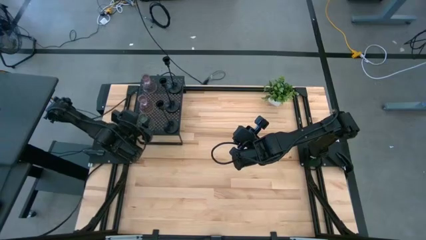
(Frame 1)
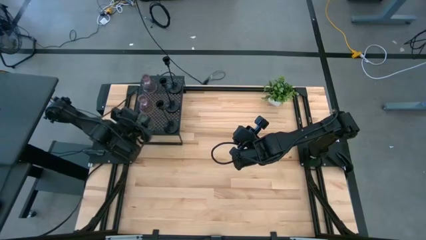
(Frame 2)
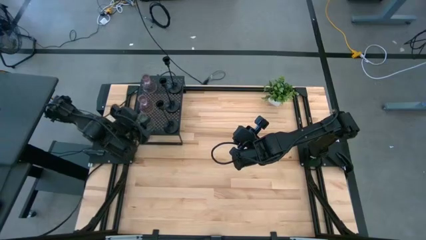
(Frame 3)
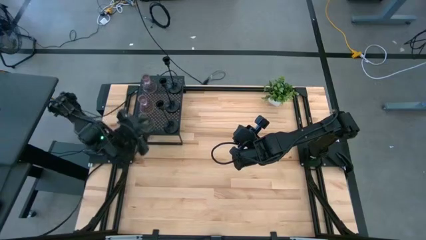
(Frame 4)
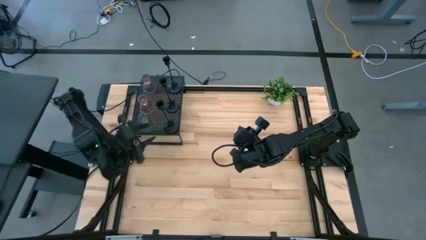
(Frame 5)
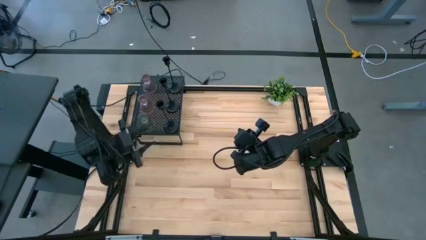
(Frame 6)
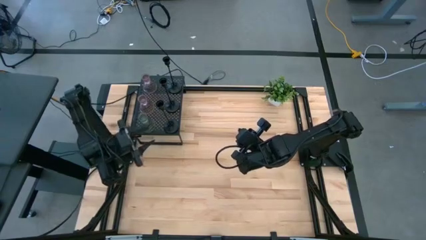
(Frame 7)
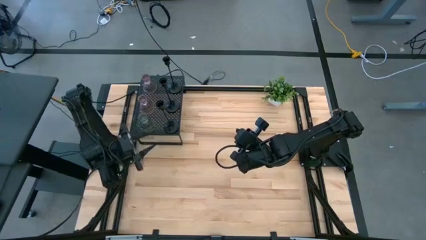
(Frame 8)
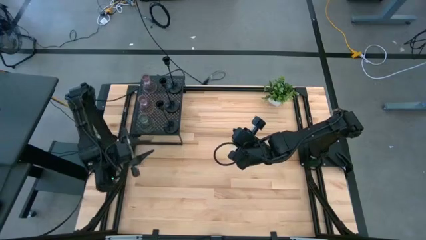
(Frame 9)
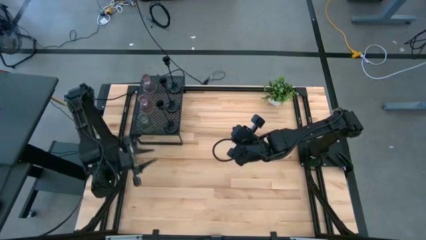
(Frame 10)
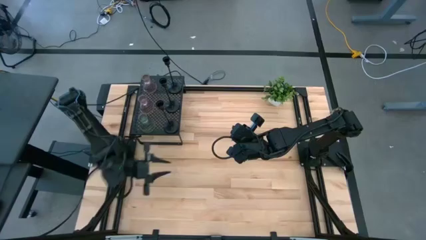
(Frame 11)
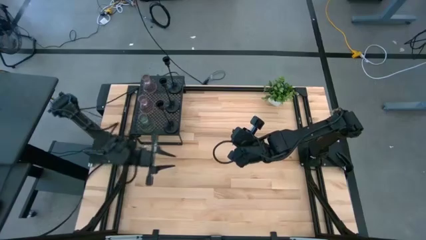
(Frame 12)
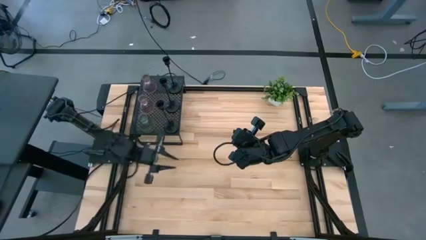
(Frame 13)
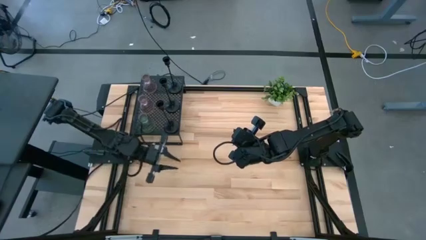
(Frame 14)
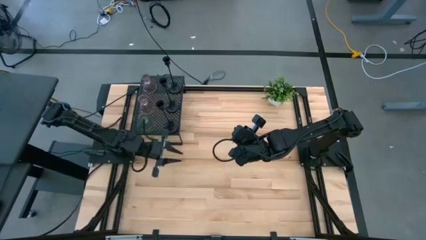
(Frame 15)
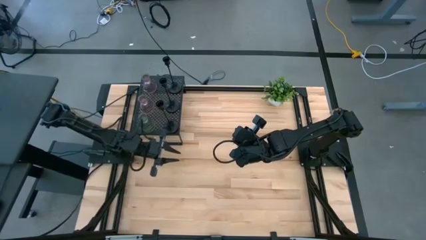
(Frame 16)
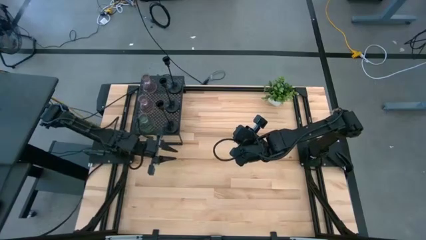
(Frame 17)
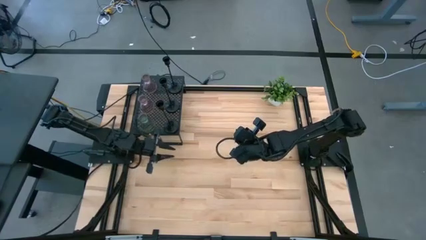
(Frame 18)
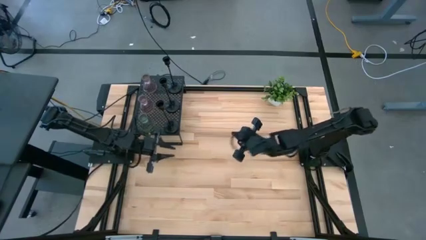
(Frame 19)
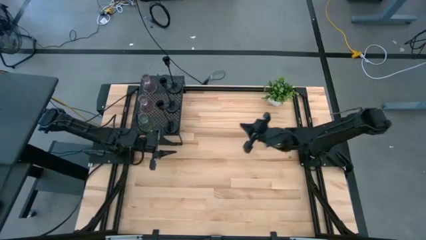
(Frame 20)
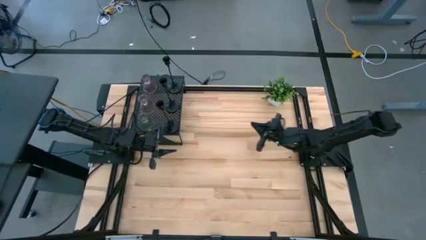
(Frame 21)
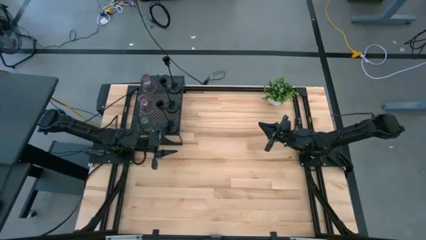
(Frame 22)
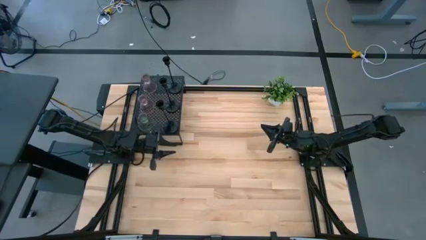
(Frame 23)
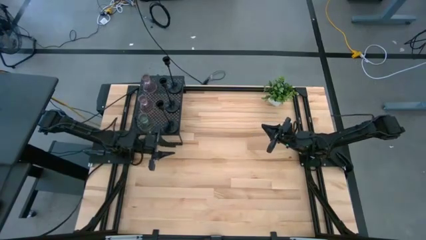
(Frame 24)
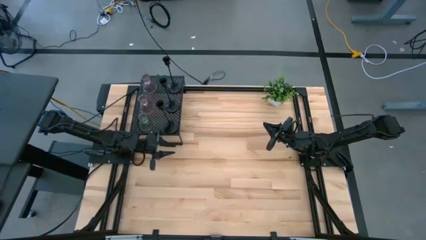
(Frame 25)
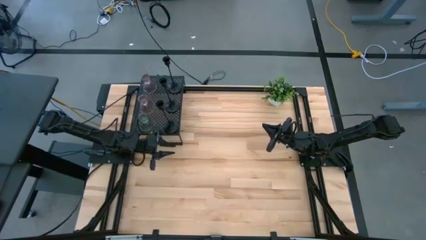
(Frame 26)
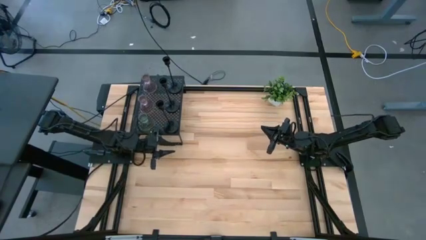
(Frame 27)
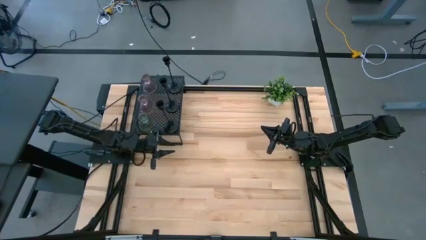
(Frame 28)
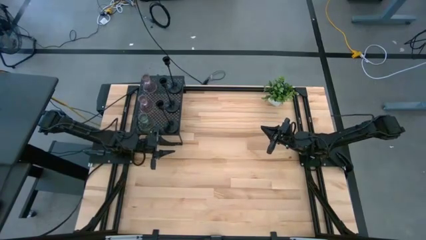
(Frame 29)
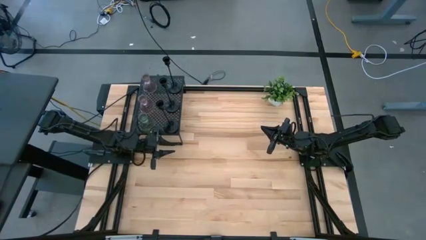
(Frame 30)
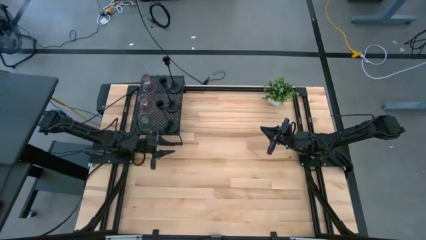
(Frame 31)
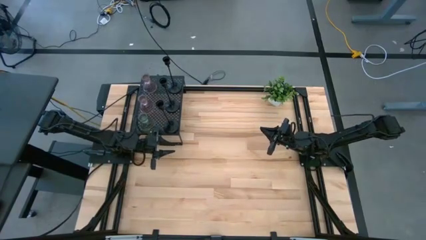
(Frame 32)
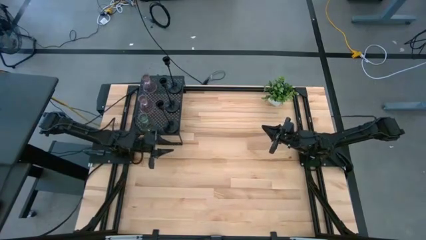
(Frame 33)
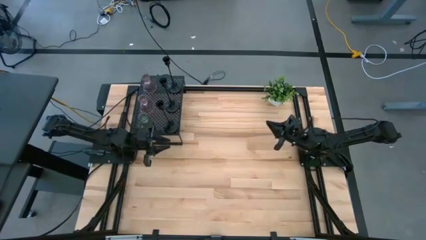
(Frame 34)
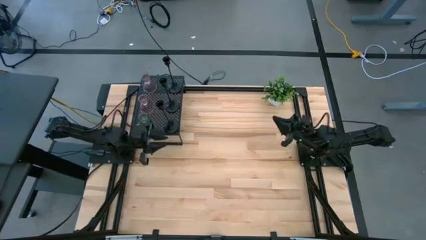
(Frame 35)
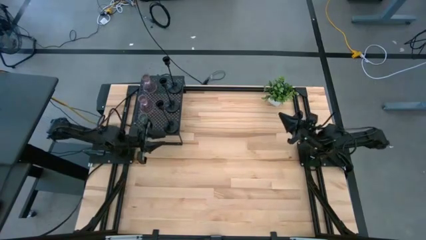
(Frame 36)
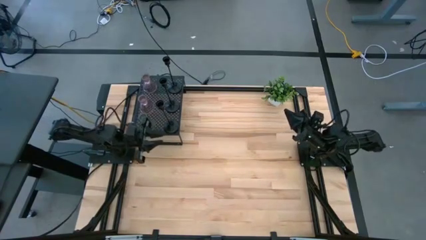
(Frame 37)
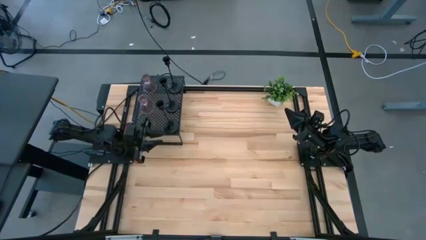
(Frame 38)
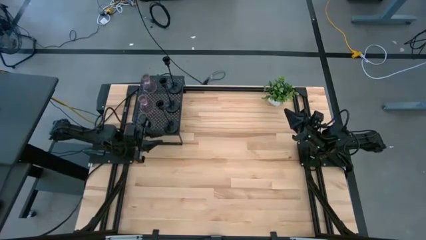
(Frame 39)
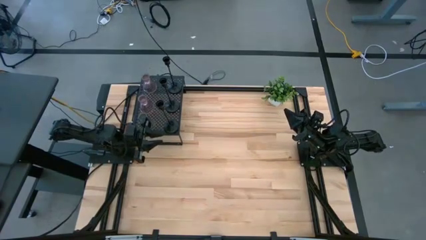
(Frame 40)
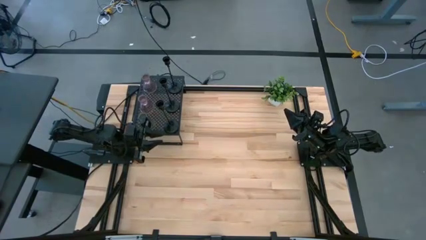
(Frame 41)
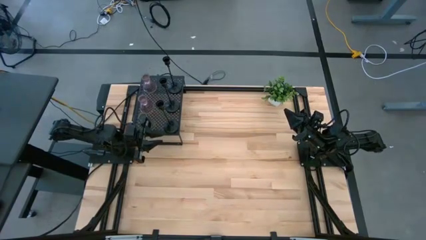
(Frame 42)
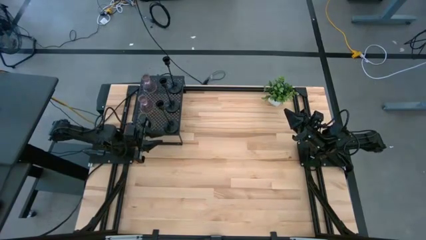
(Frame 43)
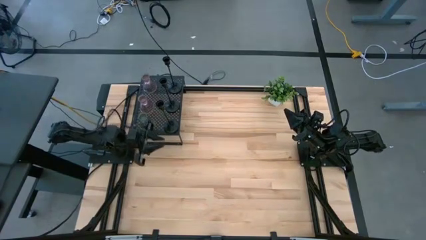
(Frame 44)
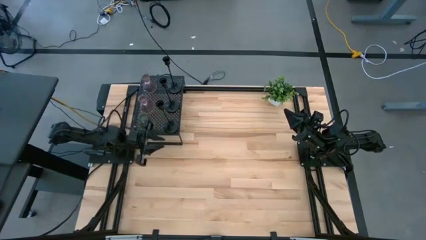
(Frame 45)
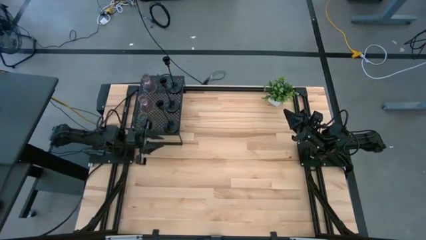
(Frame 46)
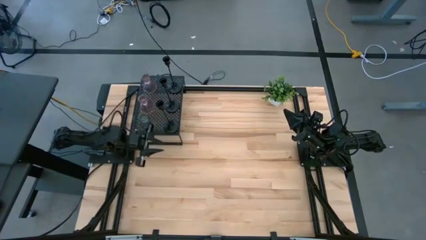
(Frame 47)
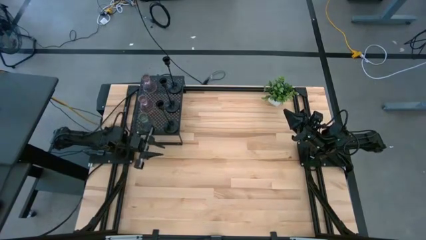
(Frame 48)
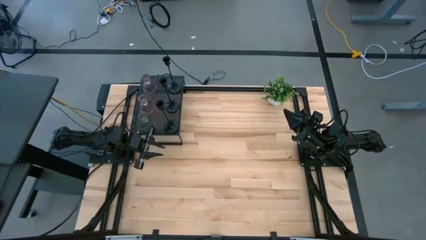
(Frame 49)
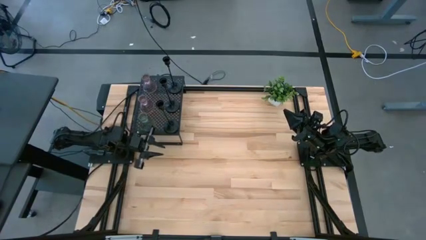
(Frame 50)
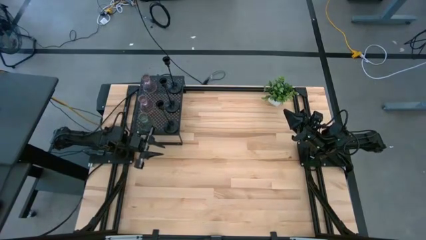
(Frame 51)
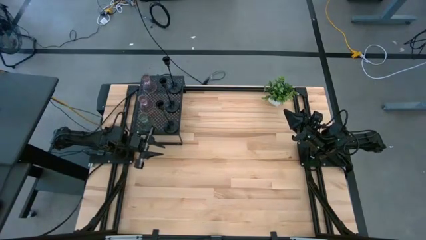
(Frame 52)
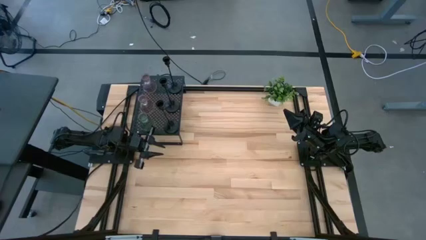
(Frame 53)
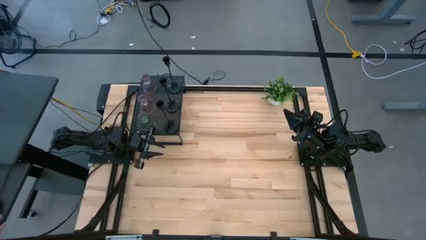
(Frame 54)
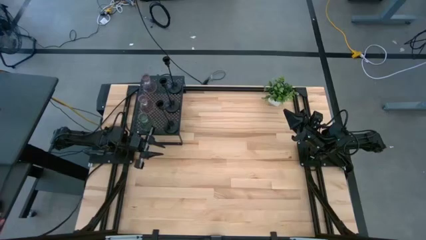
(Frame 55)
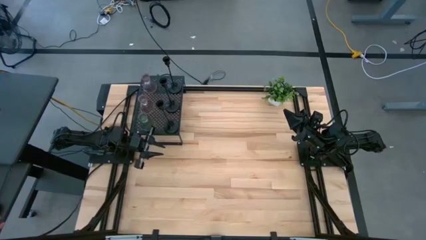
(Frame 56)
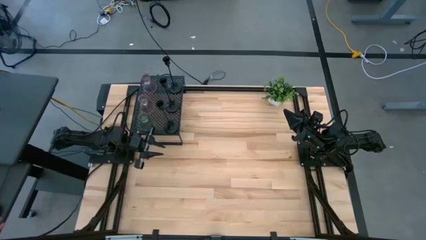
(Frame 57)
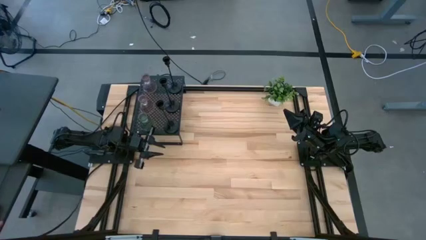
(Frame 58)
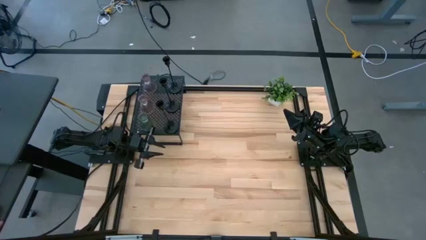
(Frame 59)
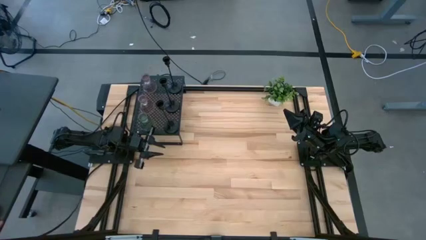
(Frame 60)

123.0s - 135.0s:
Task: Pick & Place candle stick holders
Return to Home Position

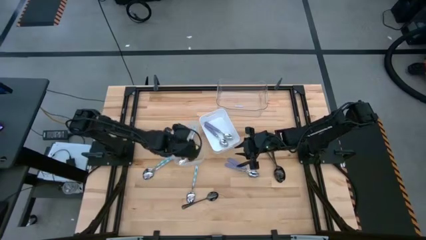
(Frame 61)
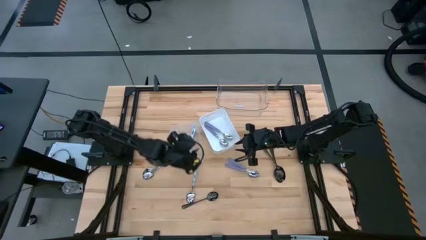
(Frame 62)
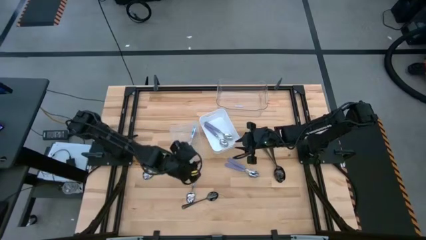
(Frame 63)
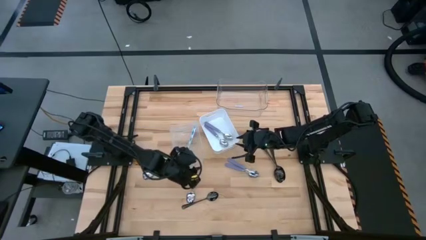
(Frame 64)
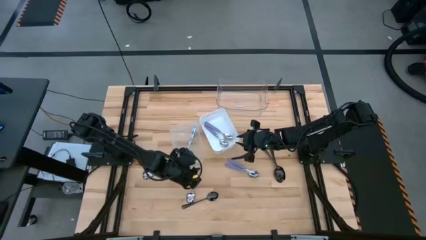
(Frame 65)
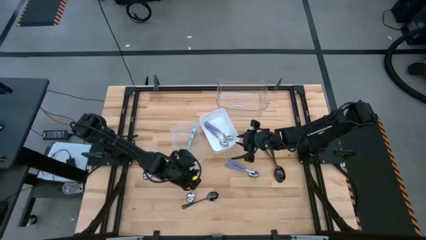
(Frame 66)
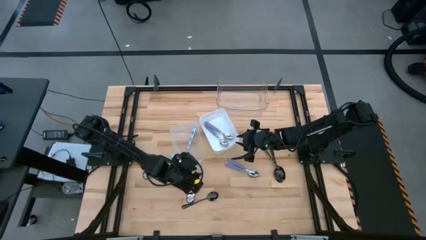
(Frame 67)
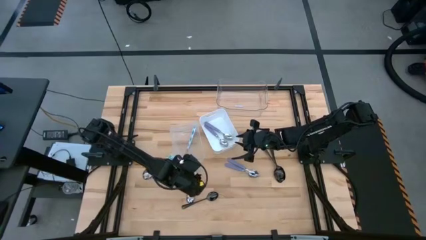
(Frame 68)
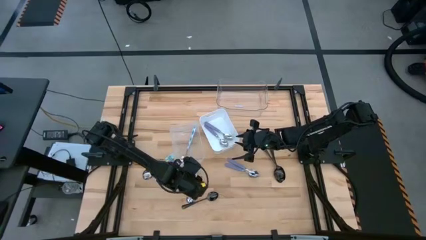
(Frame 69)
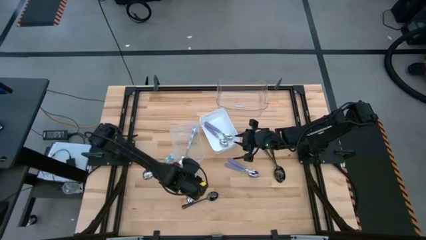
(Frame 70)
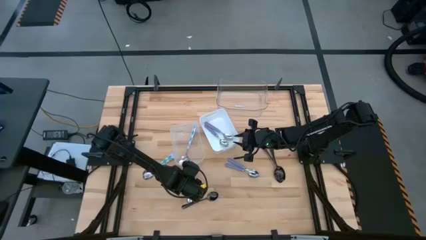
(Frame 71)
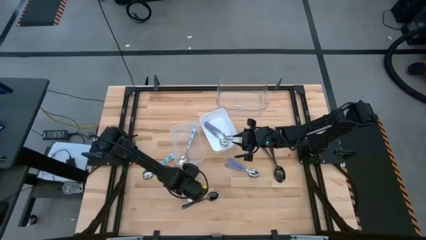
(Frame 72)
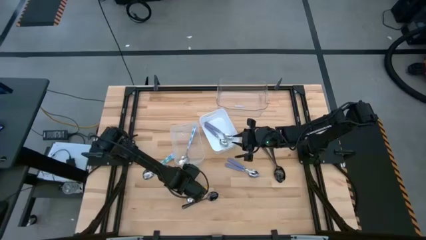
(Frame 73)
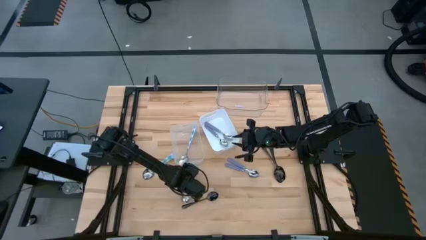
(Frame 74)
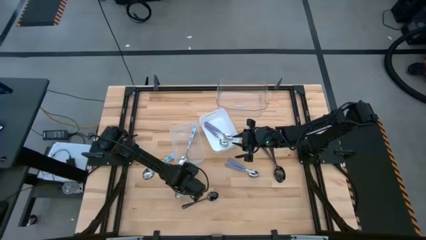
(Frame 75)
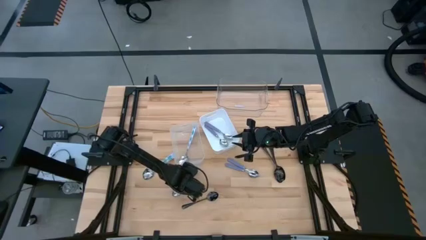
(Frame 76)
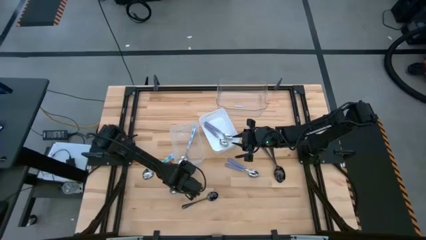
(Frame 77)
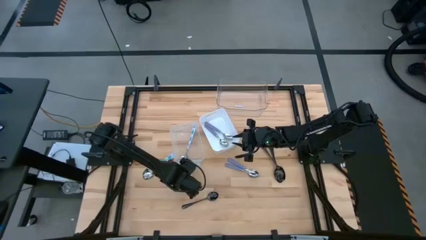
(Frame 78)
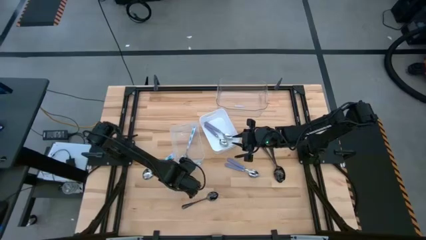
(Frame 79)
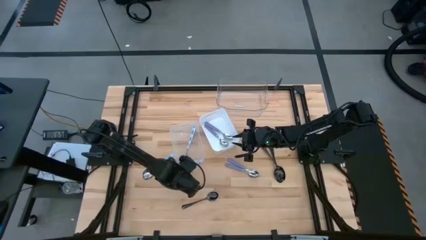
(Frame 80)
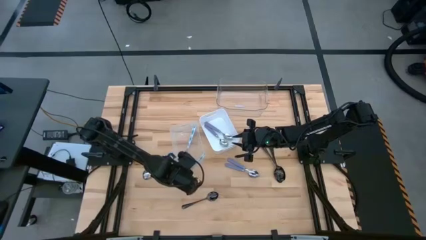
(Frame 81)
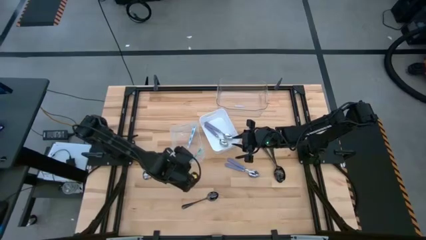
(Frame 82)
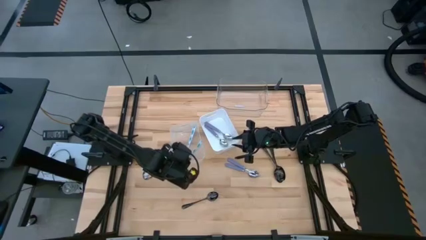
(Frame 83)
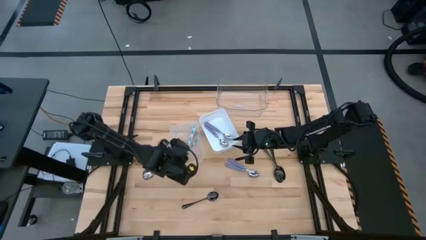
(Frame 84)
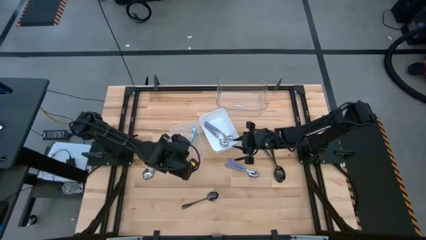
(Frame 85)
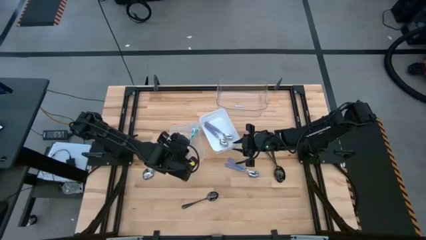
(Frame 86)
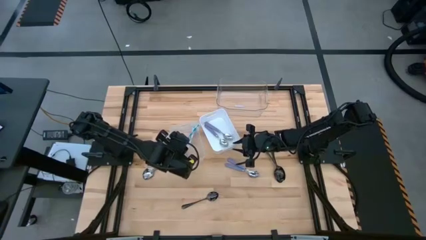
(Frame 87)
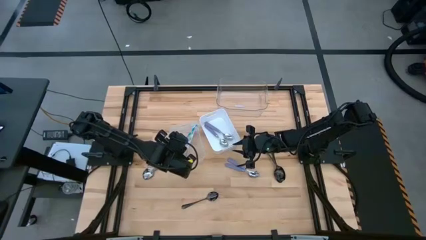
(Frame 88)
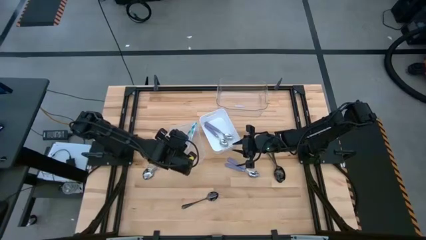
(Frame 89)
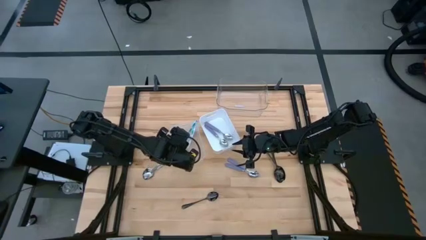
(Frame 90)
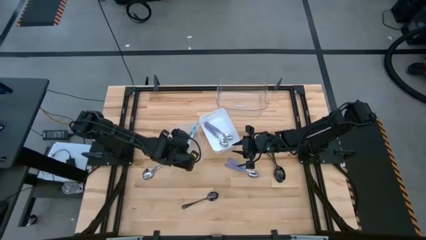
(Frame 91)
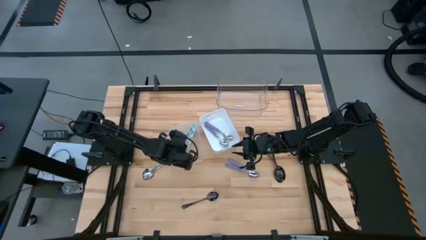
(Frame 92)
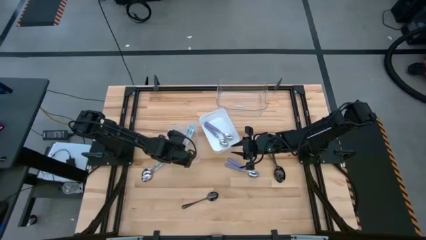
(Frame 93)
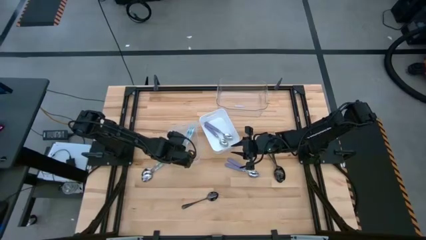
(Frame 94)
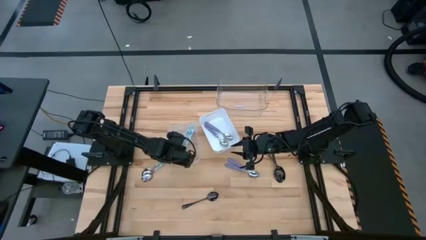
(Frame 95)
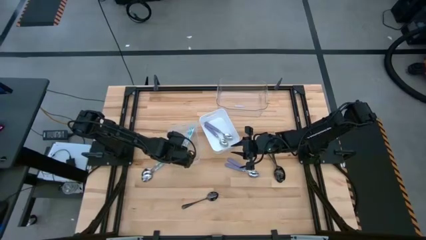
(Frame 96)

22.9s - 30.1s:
Task: Sort silverware by color (type)
Put the white-green patterned spoon into the bottom transparent bin
